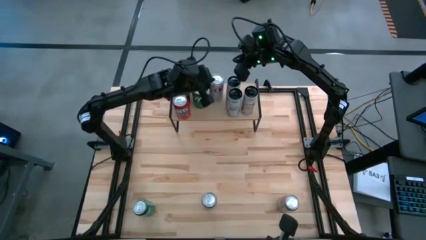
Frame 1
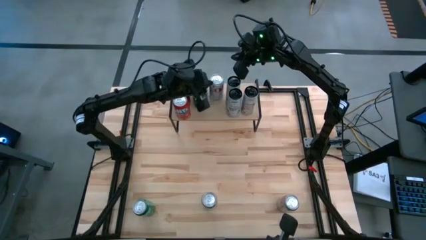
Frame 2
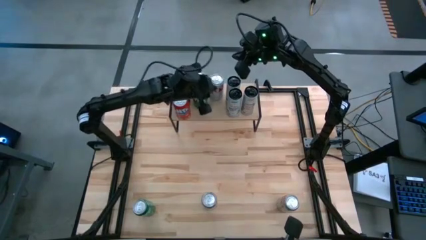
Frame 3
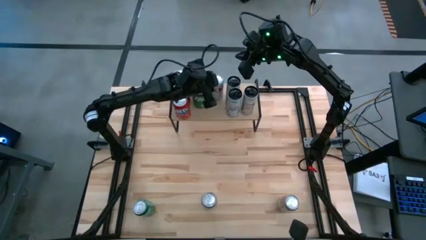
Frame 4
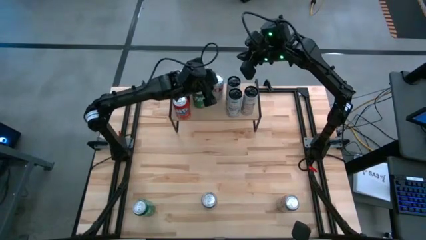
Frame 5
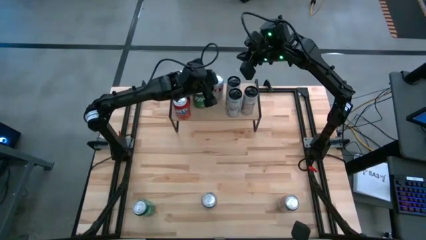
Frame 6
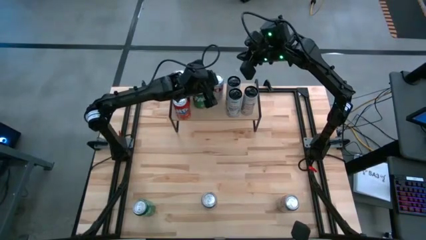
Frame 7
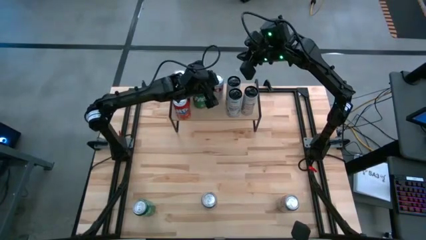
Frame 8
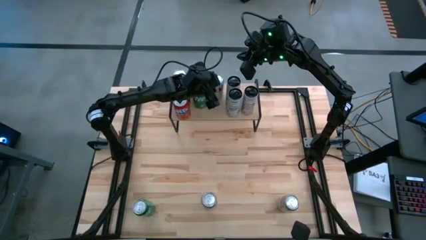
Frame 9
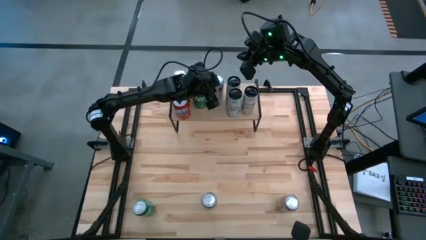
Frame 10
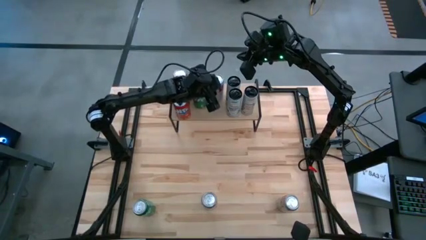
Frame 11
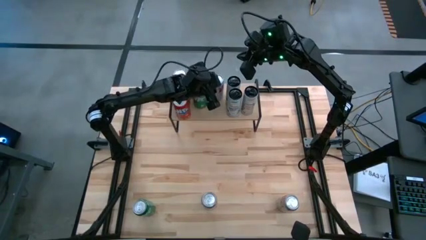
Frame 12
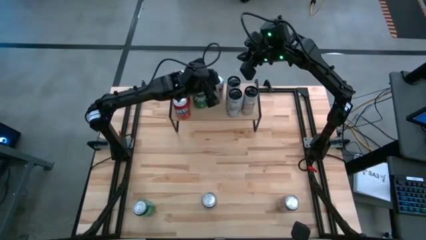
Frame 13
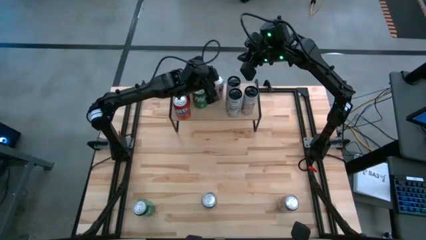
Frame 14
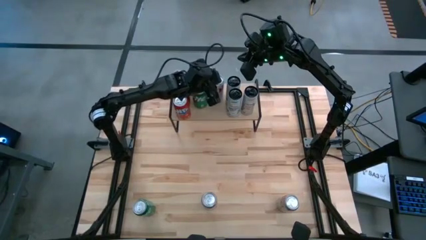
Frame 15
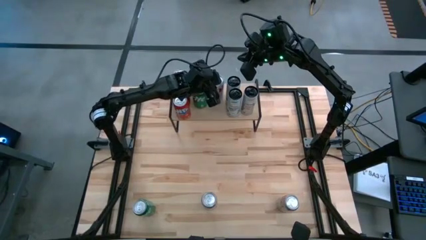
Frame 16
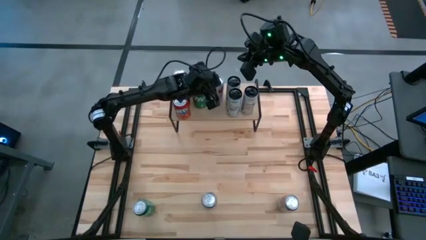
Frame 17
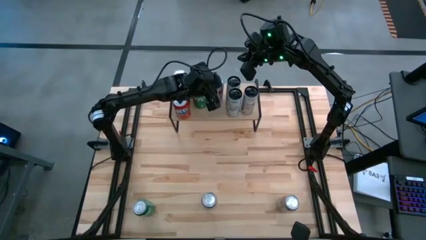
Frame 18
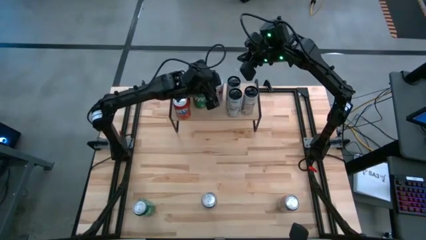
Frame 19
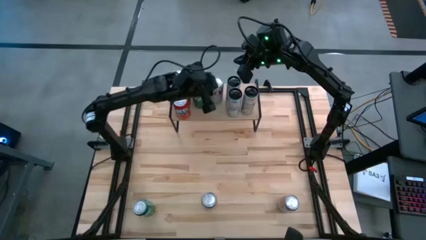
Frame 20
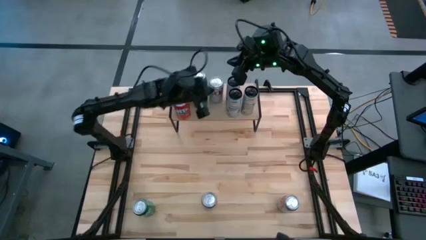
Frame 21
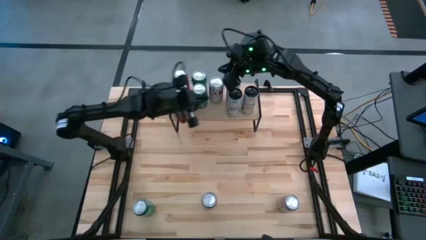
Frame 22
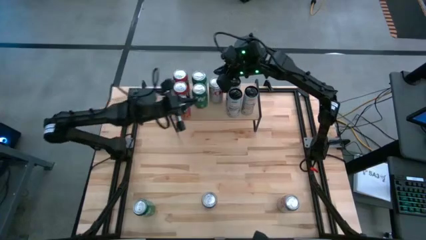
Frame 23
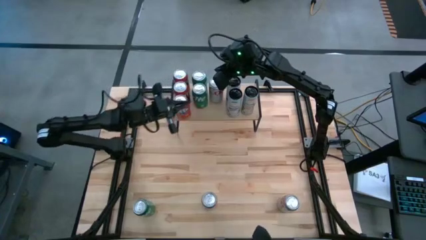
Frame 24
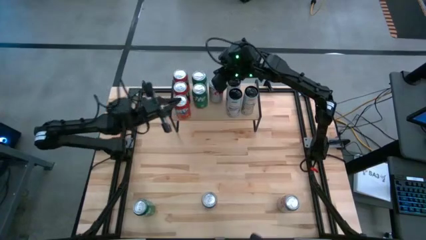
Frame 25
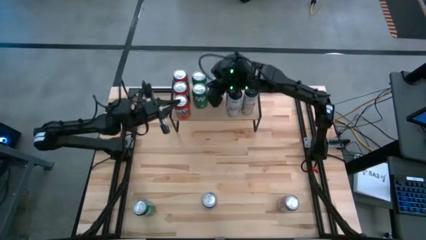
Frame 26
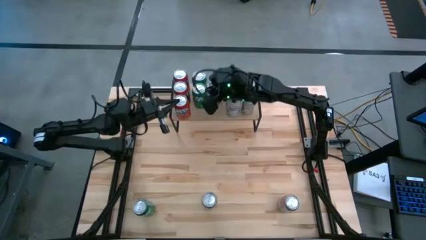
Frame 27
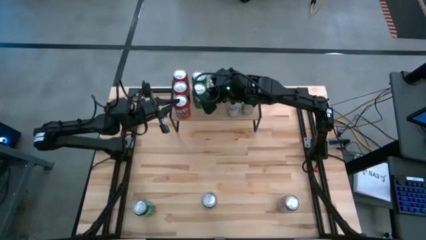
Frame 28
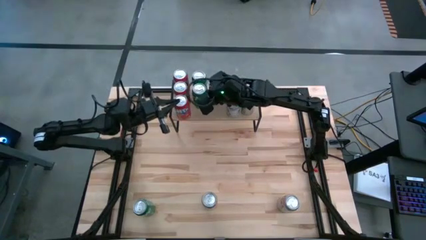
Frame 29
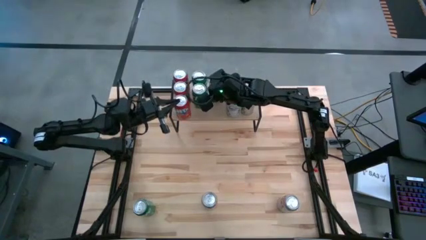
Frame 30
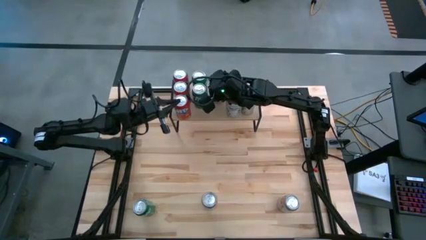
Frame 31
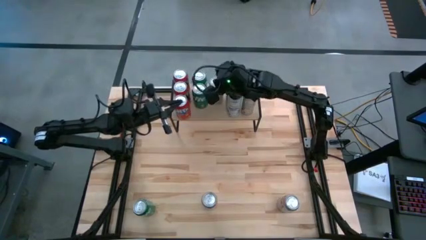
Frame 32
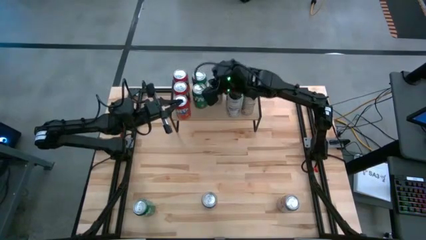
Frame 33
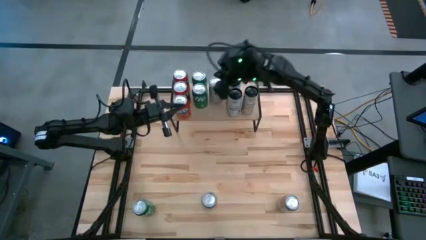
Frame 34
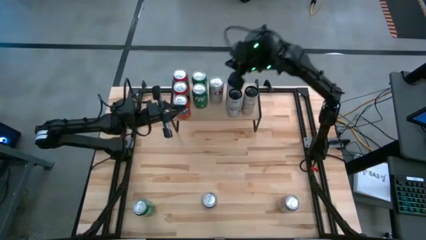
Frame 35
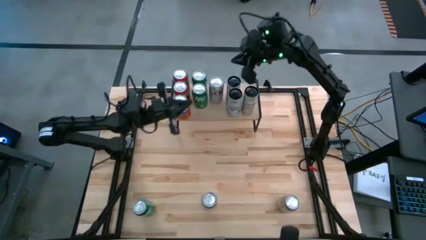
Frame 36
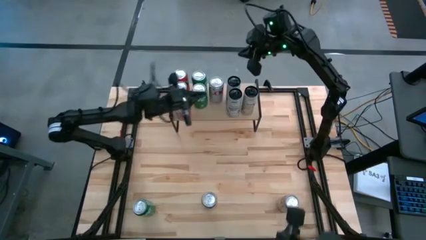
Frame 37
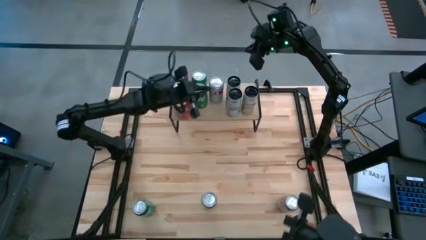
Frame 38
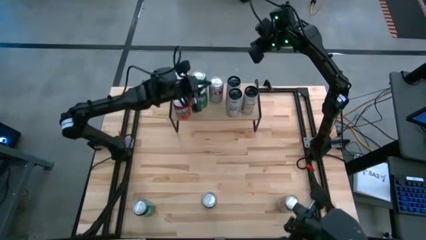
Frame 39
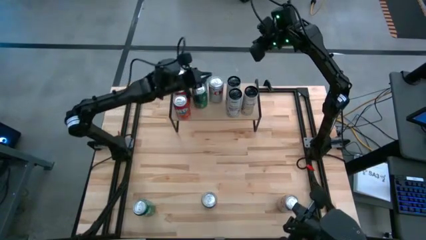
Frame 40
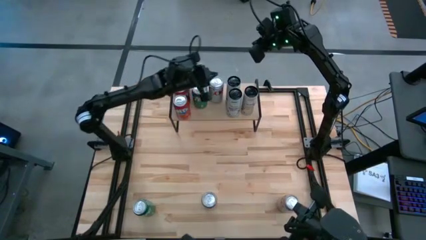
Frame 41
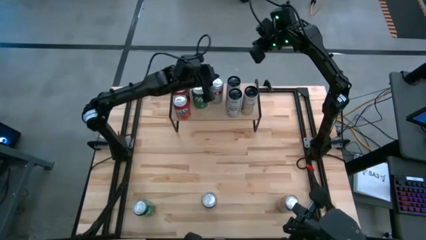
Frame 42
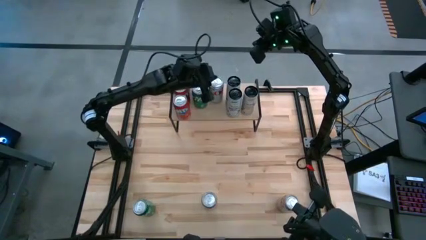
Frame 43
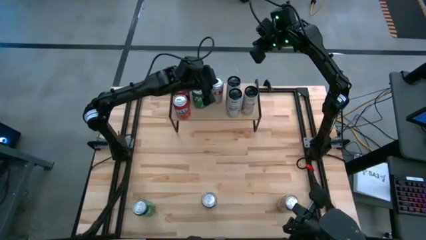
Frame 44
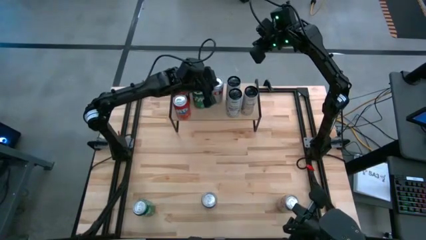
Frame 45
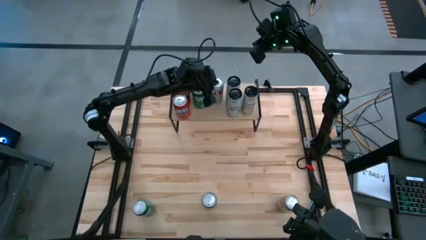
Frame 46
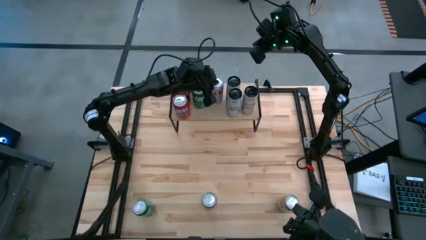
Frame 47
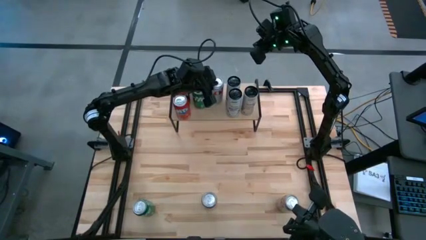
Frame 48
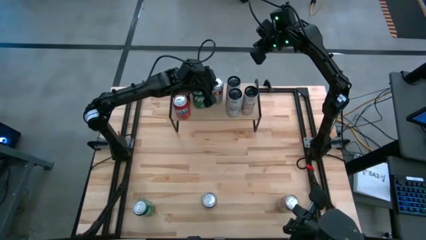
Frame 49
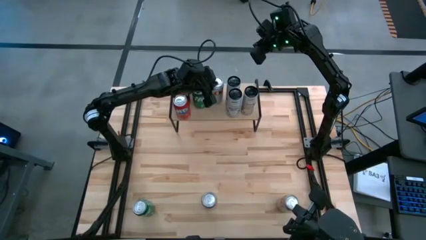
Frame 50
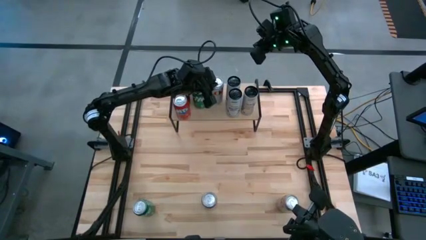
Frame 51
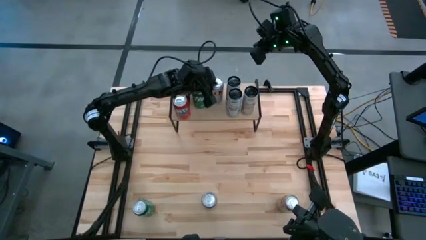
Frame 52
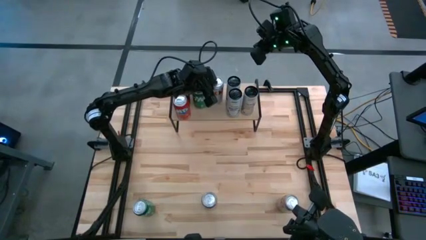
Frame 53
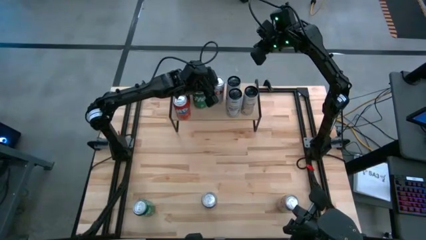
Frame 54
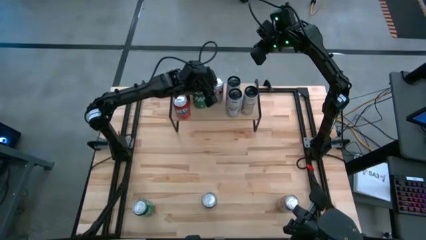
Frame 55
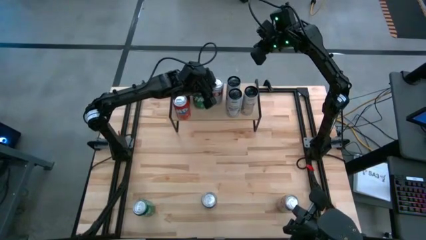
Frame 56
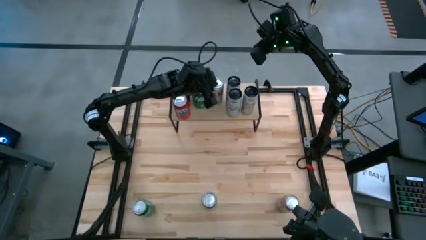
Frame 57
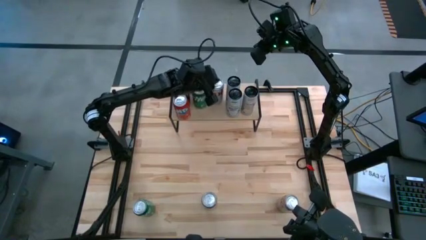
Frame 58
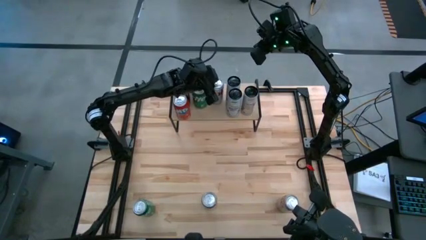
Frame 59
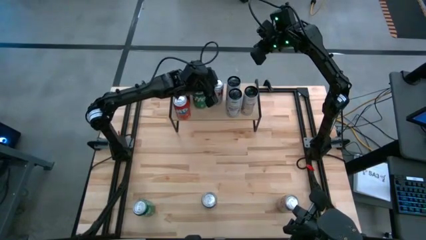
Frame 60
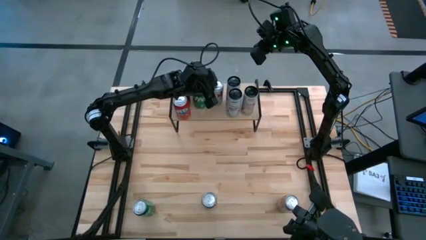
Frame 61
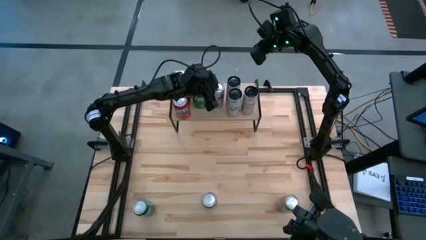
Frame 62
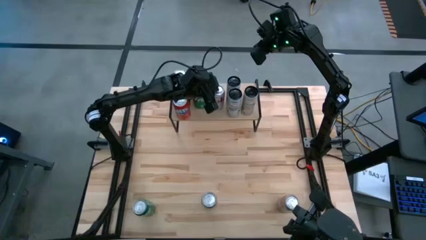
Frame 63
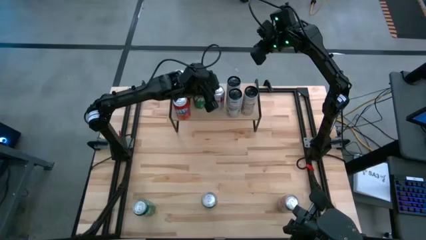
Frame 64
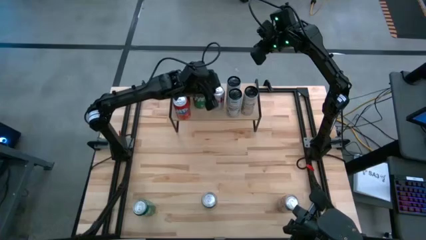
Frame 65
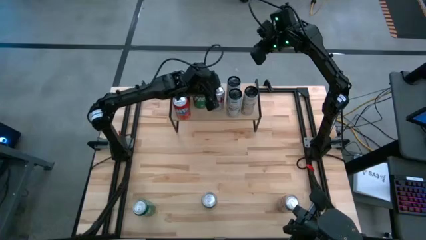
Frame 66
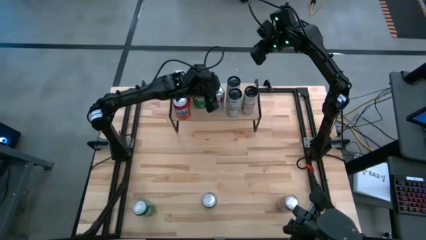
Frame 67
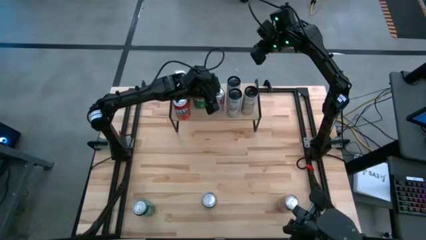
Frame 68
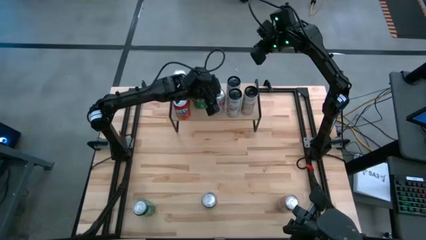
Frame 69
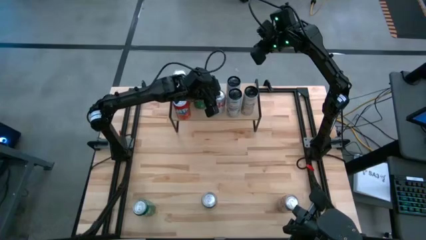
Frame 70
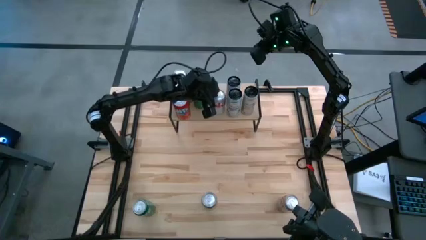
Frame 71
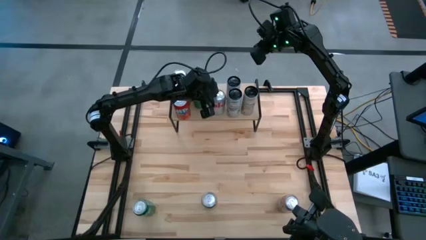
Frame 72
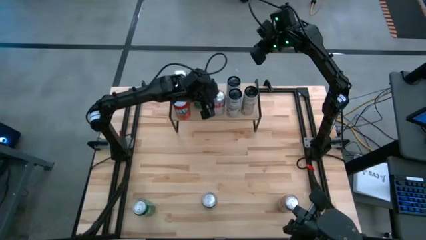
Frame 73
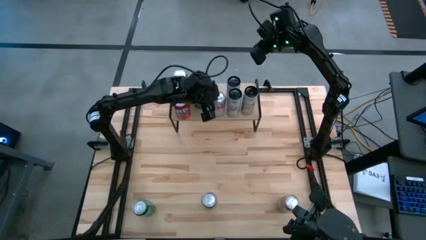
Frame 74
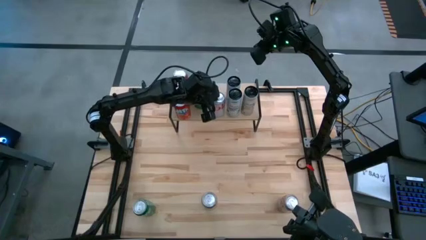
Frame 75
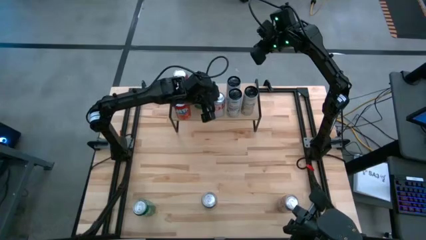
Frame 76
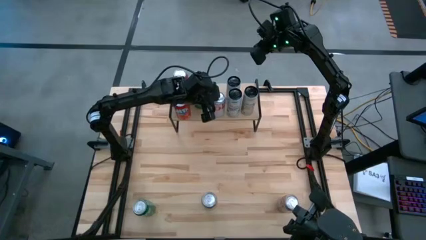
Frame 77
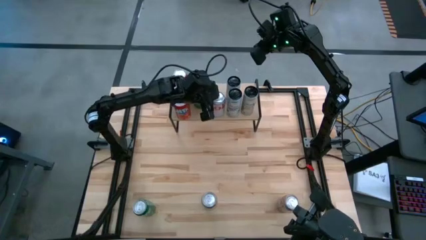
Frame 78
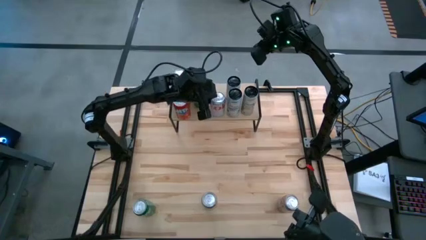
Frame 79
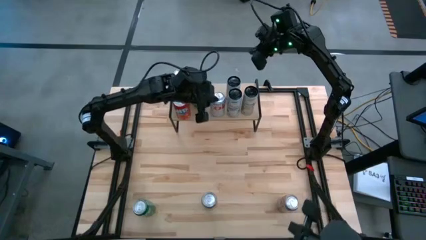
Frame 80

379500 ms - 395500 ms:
Task: Place canned beverage on shelf
Adjust the soda cans on the shelf
